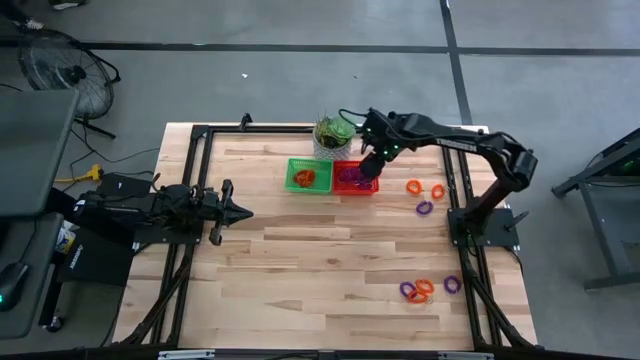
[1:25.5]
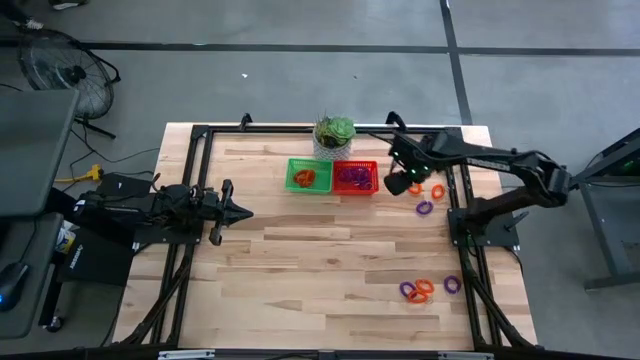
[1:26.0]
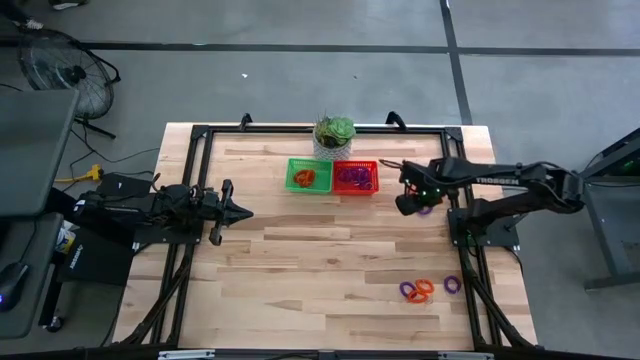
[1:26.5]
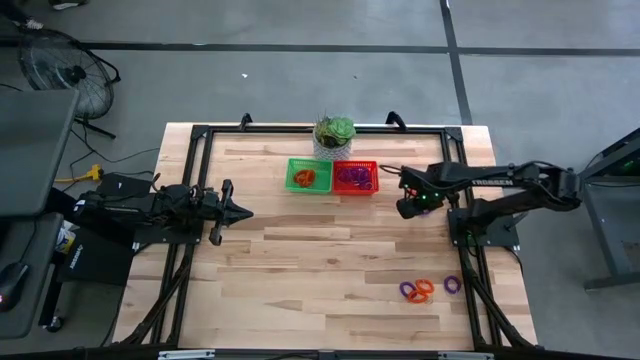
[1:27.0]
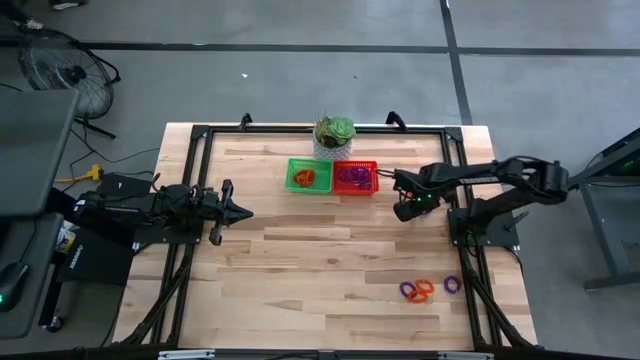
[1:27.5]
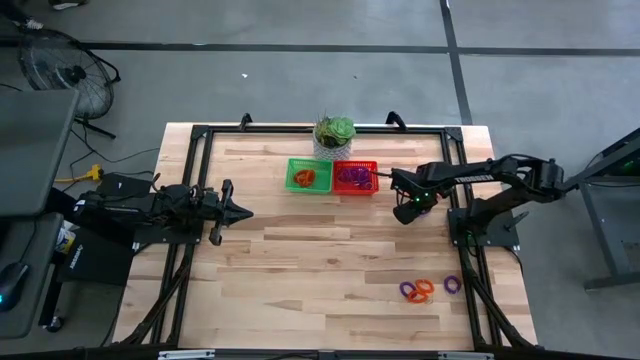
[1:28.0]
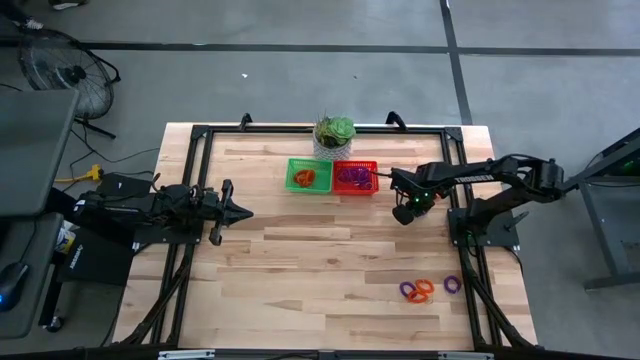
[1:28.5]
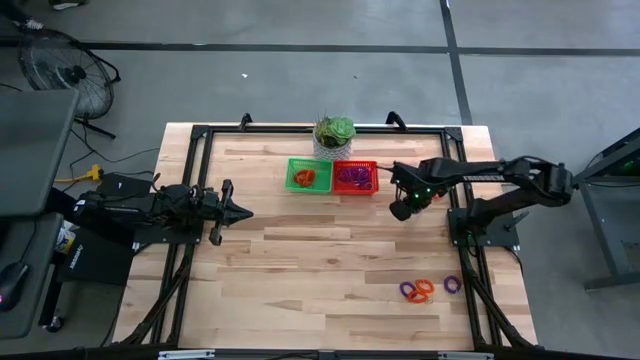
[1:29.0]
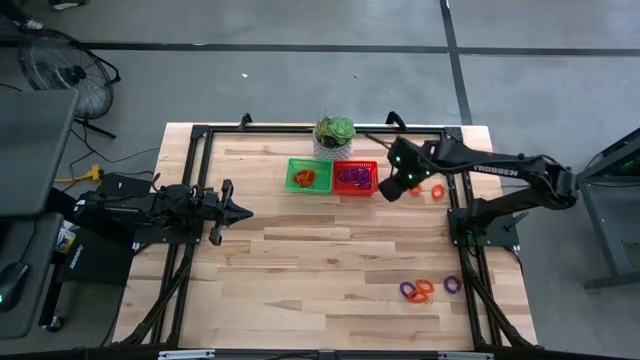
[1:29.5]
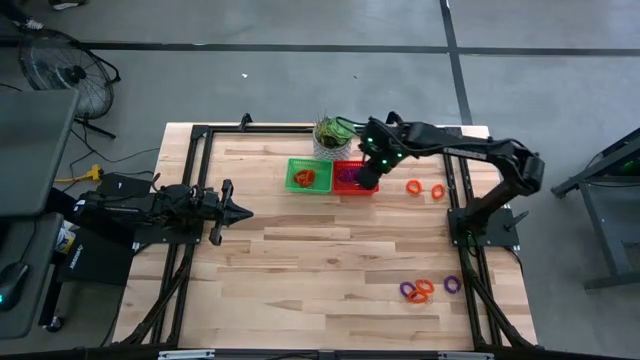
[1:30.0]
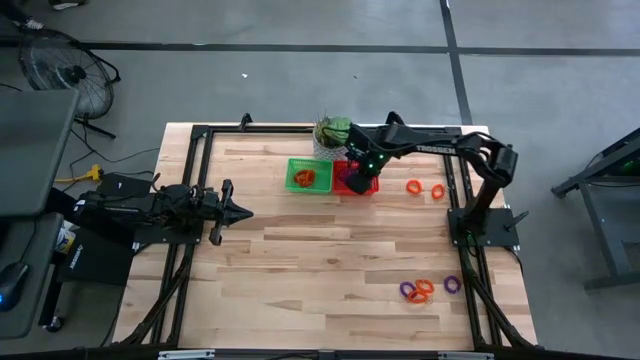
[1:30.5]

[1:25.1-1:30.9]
Task: Sort spring keychains
Put the purple spring keychain into the orange bin

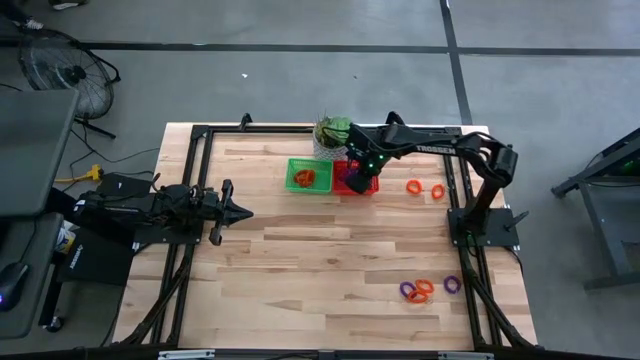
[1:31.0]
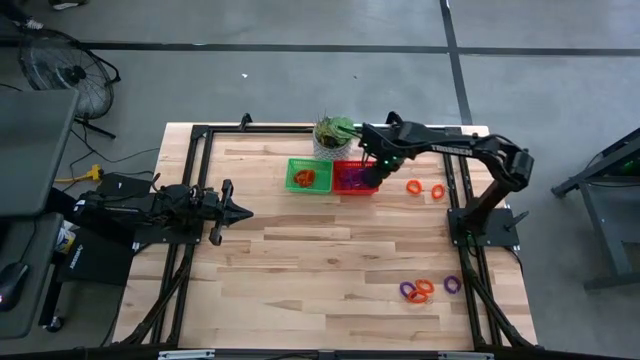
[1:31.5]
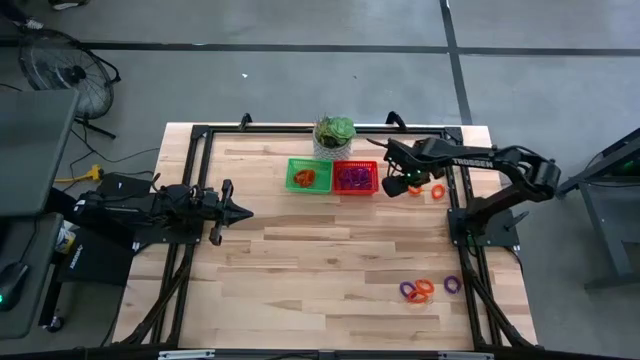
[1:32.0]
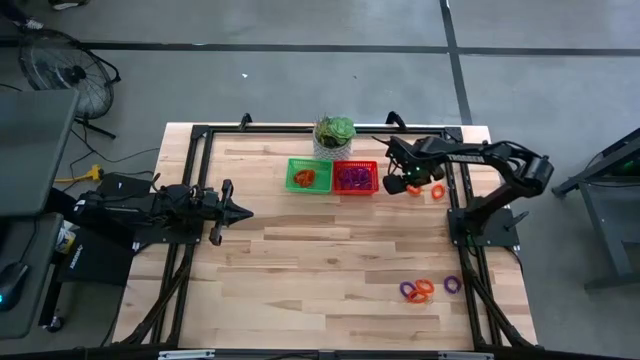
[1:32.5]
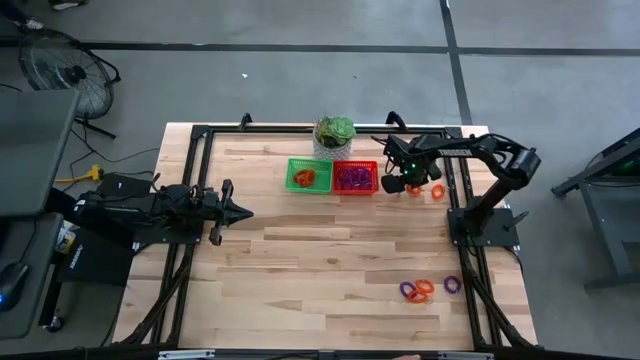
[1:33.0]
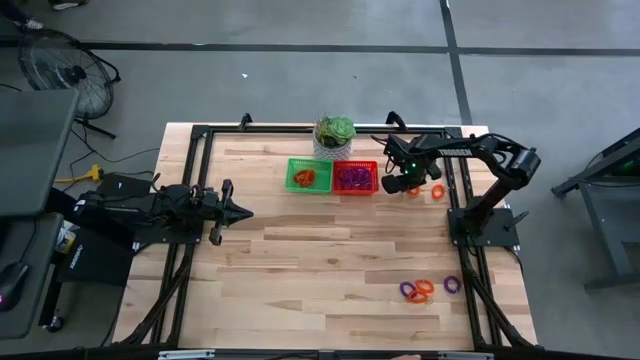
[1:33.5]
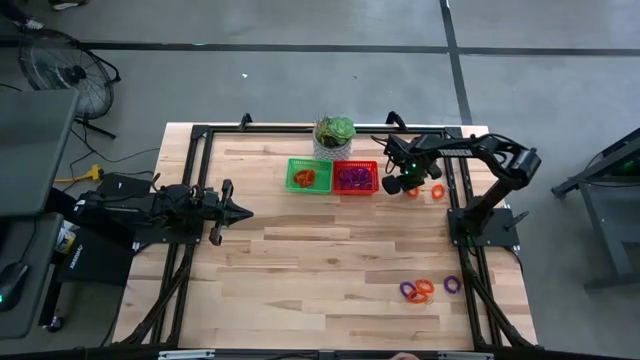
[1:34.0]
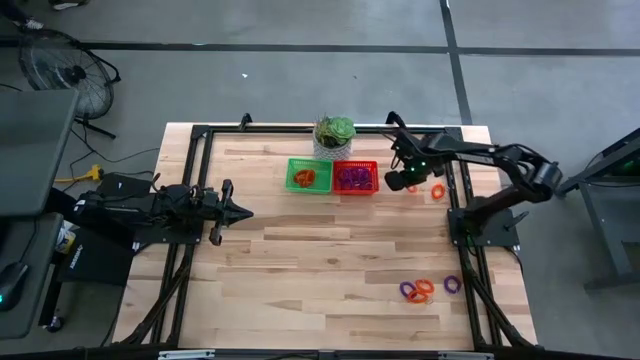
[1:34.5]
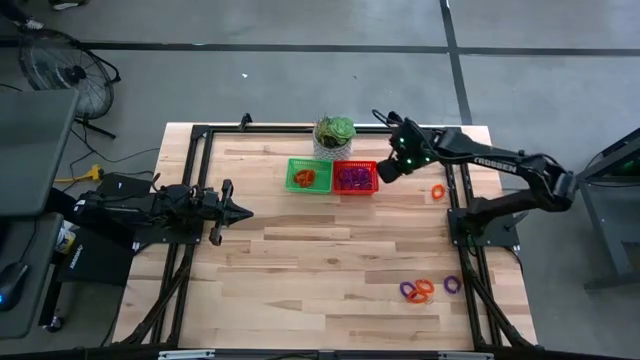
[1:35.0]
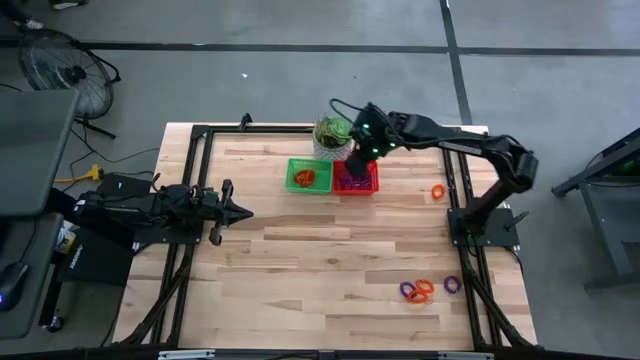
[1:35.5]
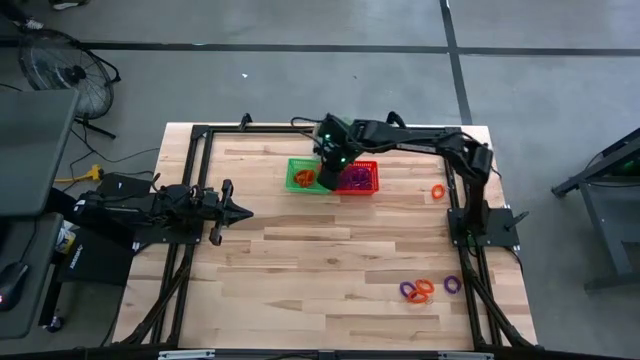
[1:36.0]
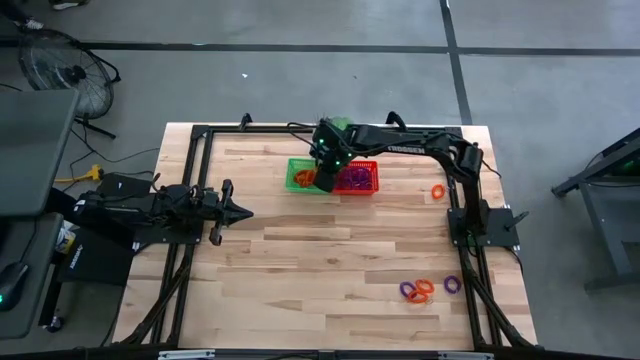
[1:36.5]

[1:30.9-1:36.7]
Put the orange spring keychain into the green bin

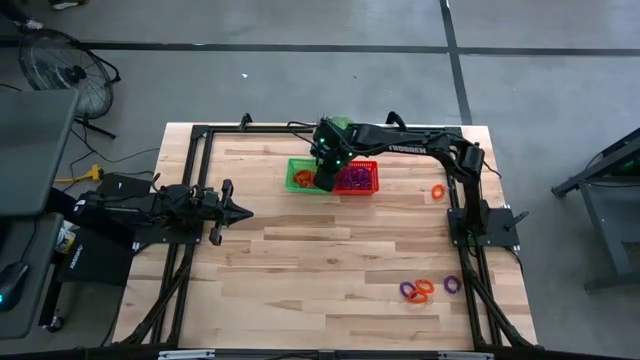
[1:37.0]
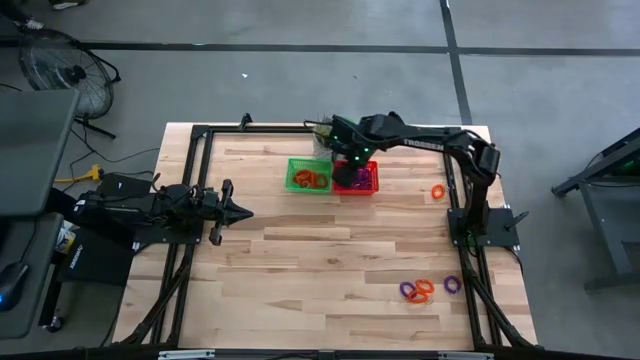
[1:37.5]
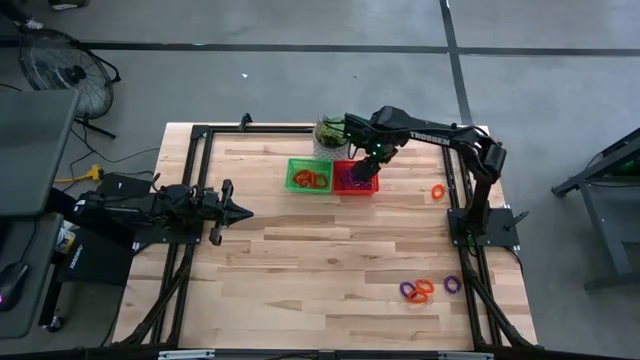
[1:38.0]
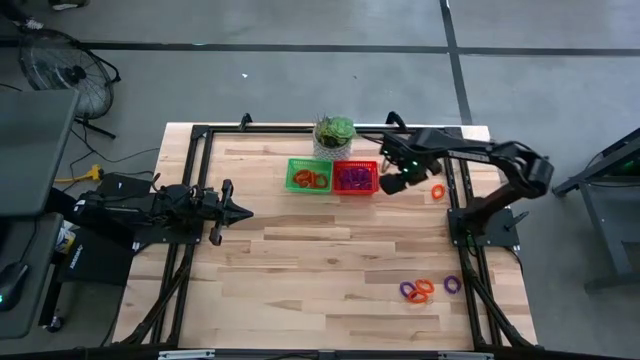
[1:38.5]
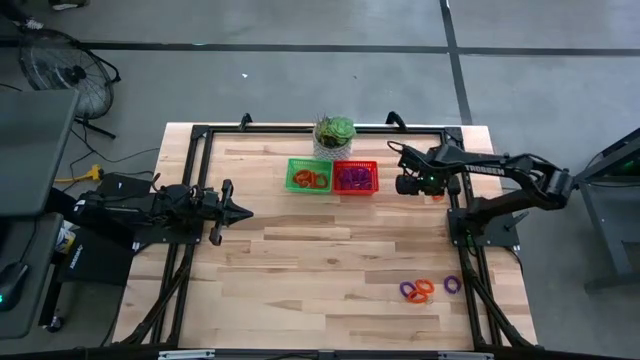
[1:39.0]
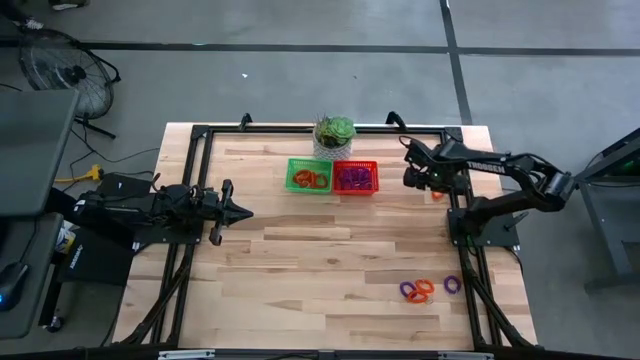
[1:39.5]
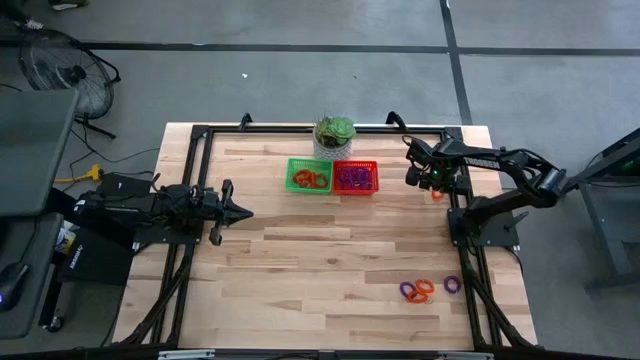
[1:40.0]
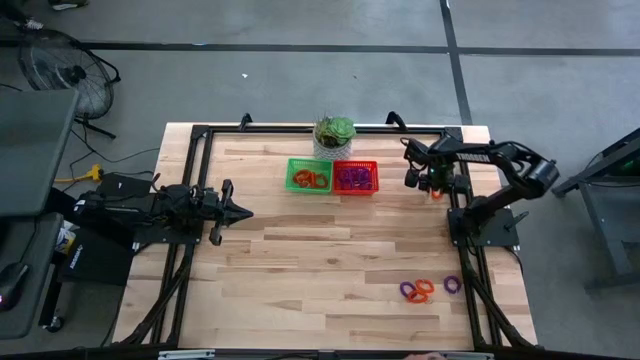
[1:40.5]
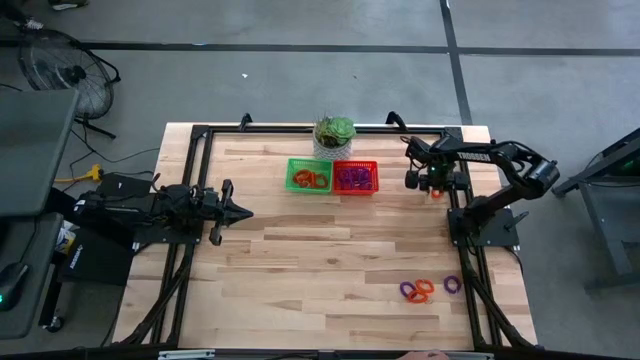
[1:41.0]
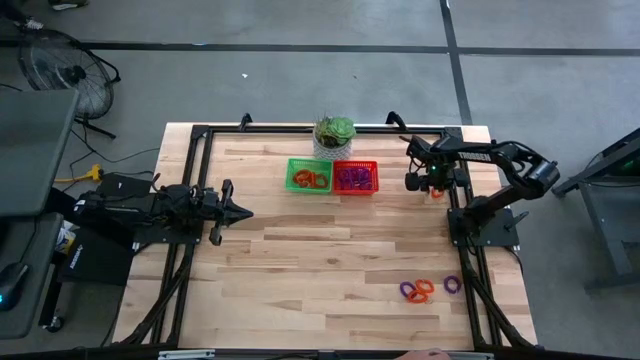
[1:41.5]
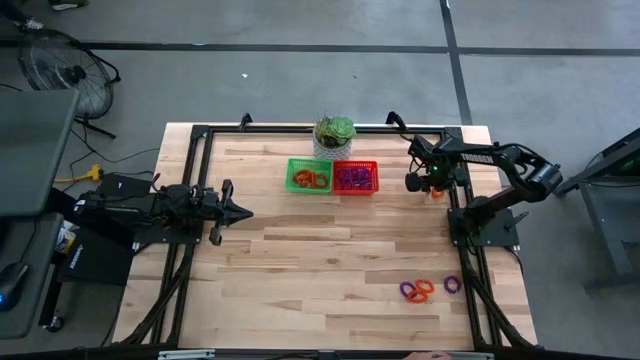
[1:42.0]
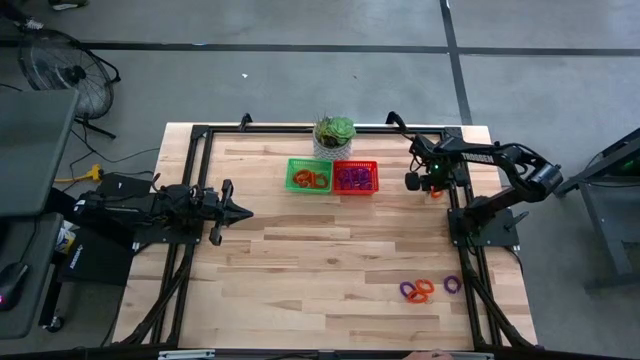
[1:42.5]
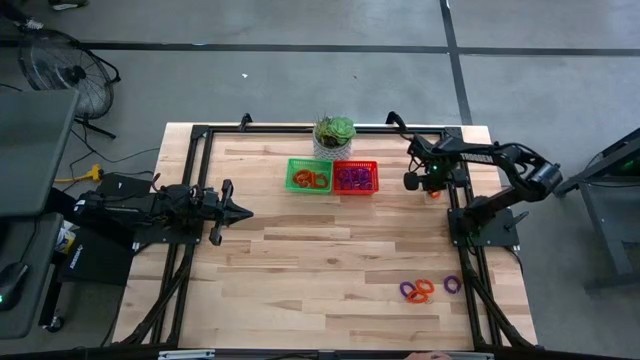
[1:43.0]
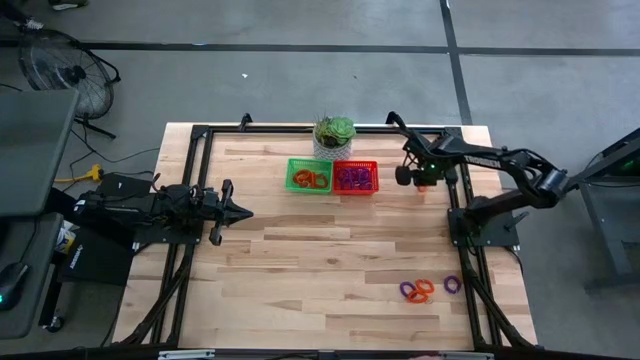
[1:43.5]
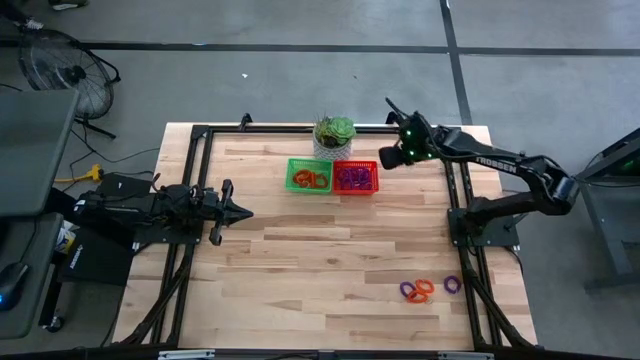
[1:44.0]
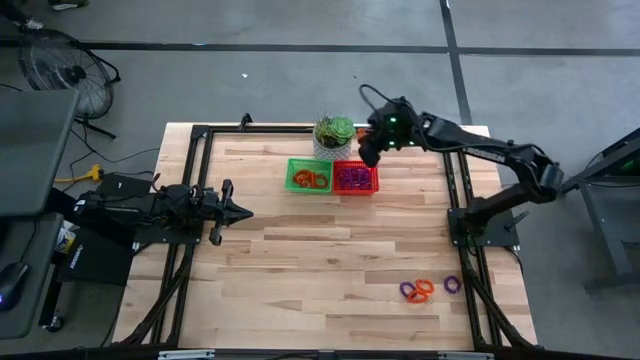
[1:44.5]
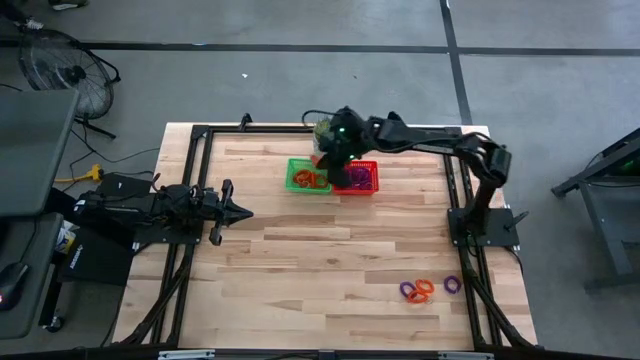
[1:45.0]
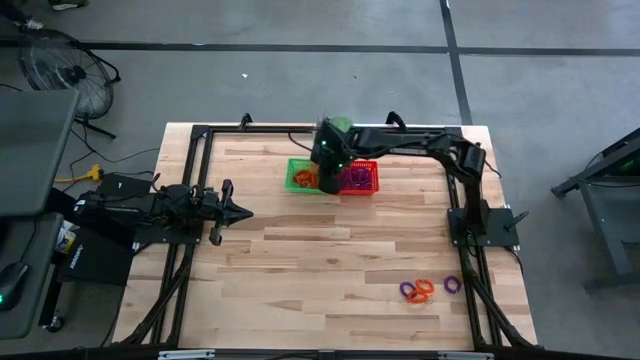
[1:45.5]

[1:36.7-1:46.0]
Put the orange spring keychain into the green bin

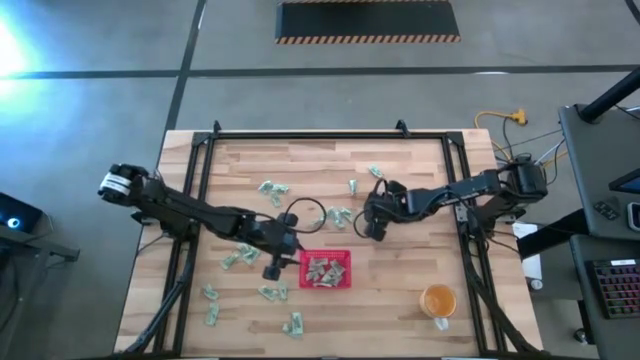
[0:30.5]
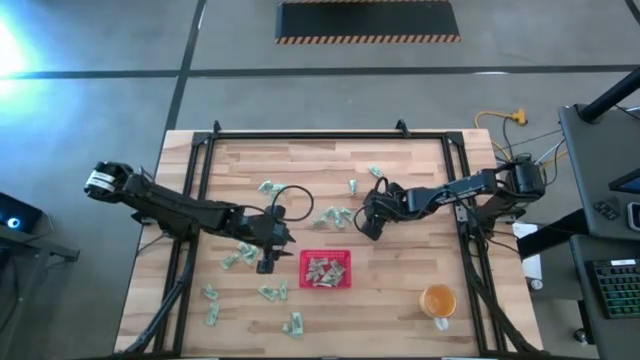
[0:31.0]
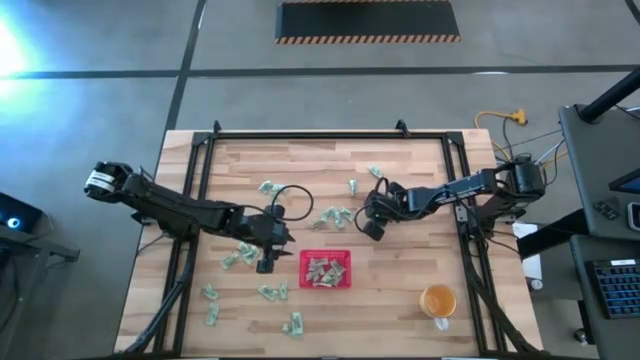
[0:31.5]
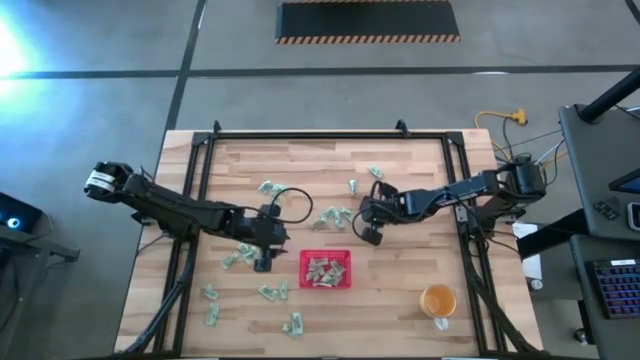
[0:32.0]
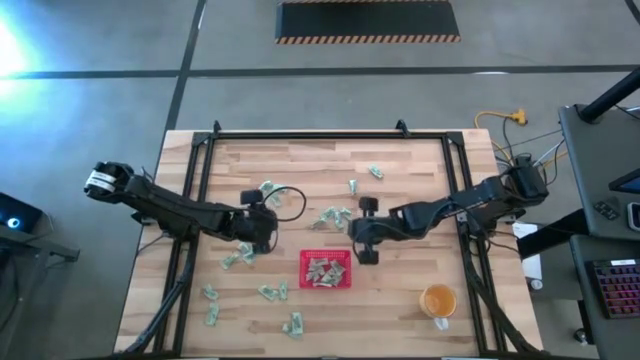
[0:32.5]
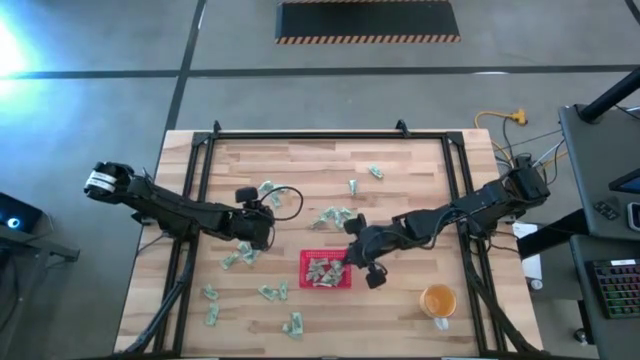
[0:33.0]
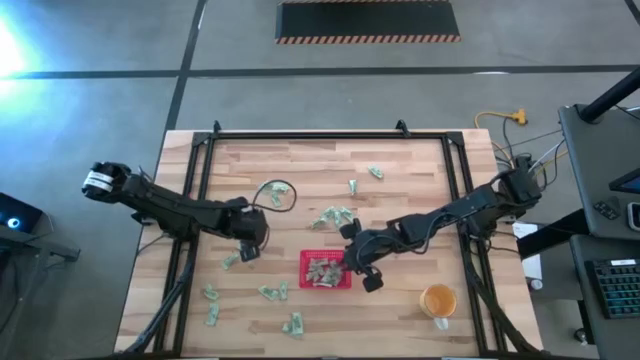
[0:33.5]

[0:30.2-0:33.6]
Task: Pick and place Stevia / Truvia into bins
Put the white stevia packet into the red bin
